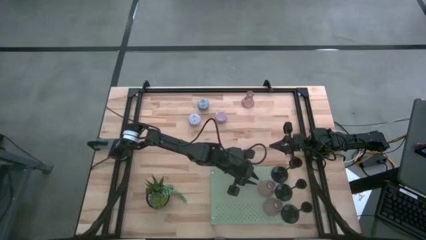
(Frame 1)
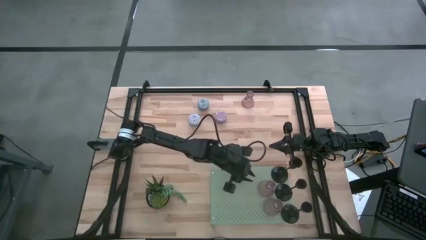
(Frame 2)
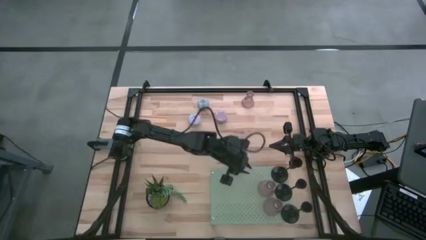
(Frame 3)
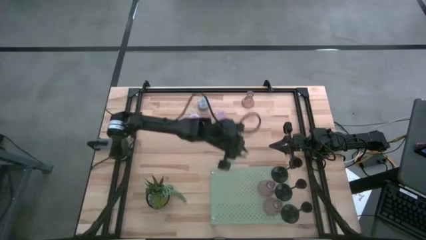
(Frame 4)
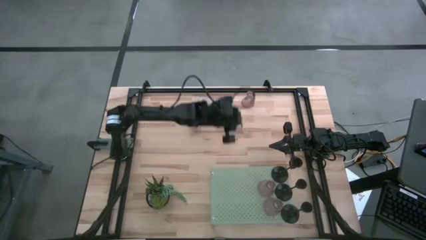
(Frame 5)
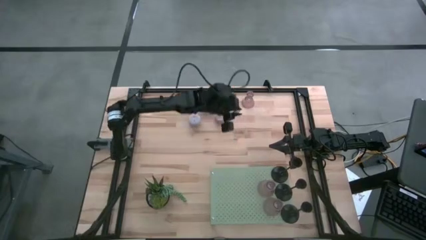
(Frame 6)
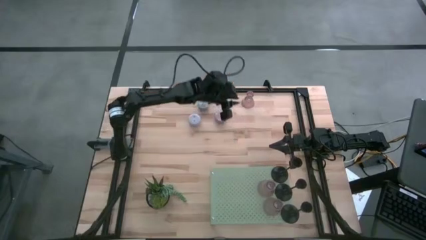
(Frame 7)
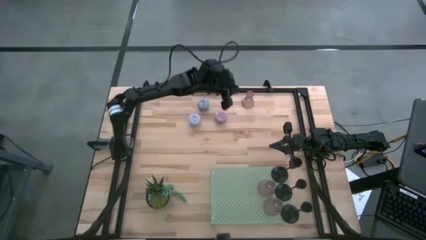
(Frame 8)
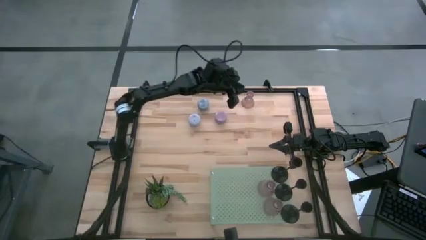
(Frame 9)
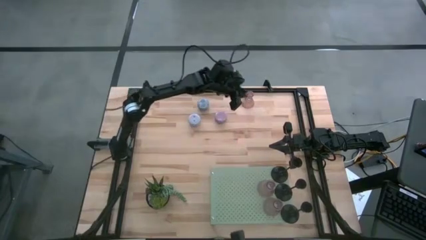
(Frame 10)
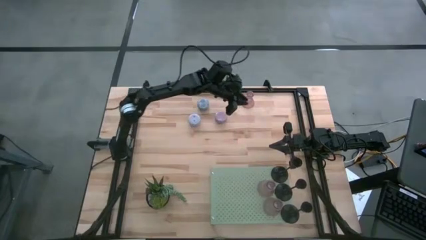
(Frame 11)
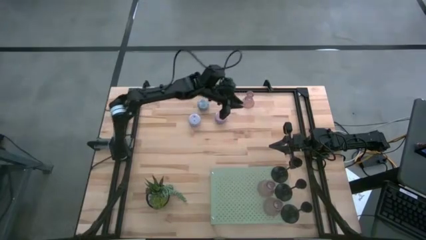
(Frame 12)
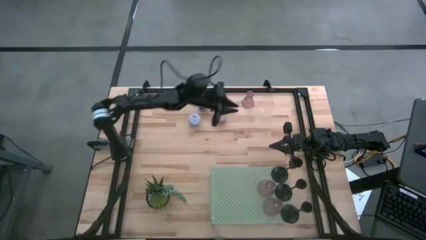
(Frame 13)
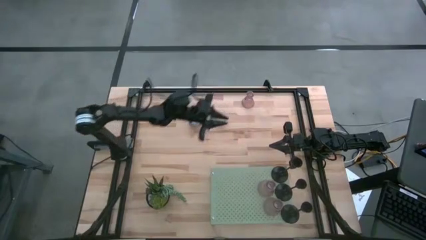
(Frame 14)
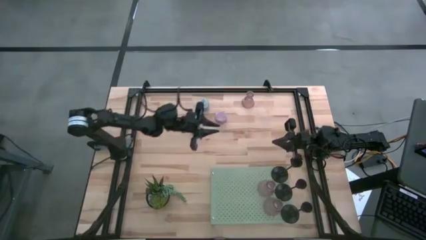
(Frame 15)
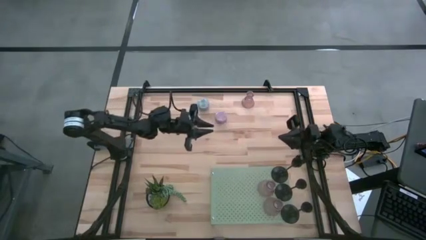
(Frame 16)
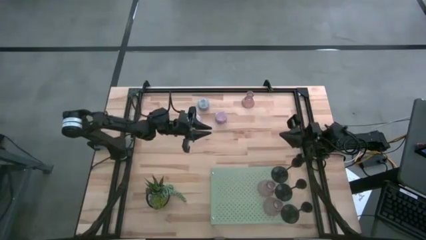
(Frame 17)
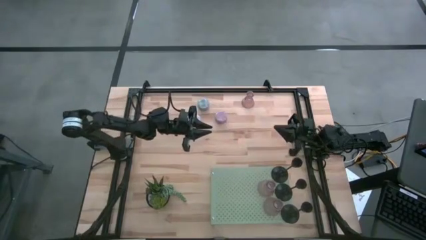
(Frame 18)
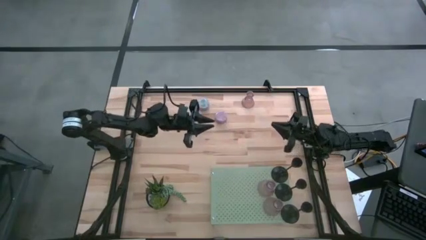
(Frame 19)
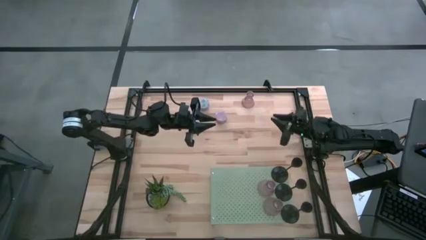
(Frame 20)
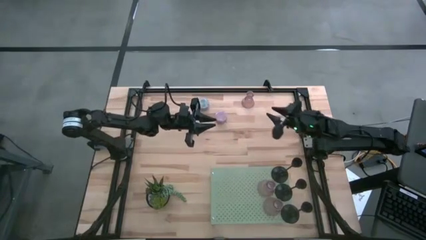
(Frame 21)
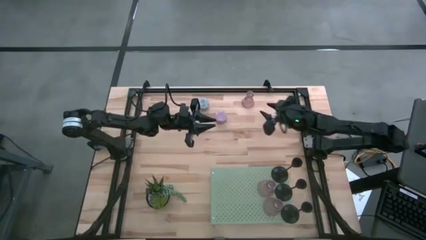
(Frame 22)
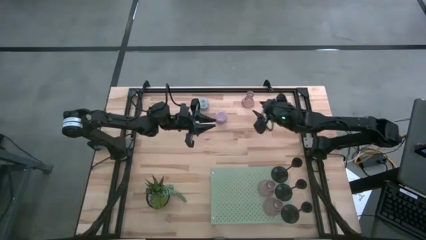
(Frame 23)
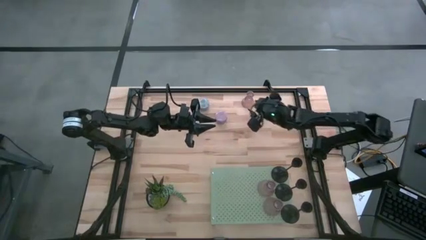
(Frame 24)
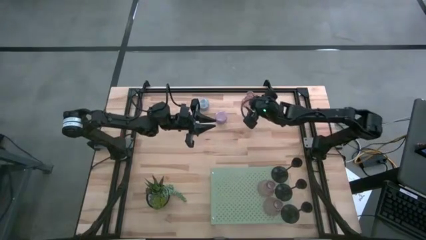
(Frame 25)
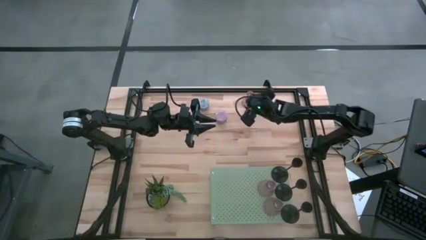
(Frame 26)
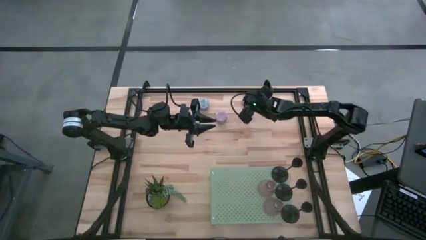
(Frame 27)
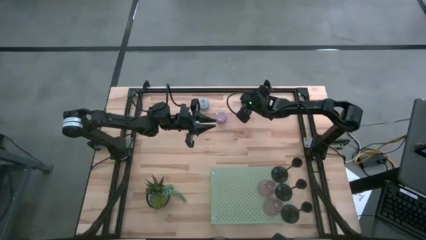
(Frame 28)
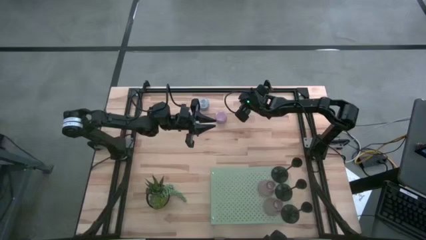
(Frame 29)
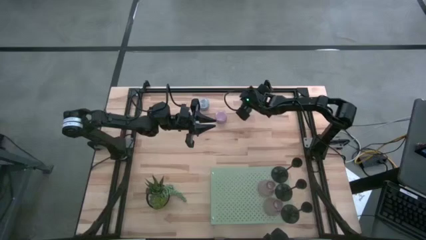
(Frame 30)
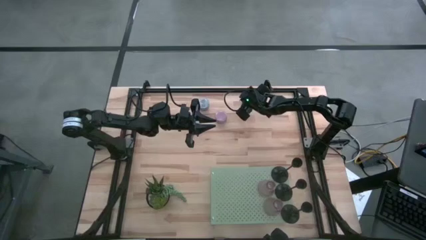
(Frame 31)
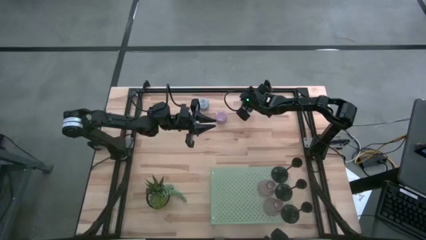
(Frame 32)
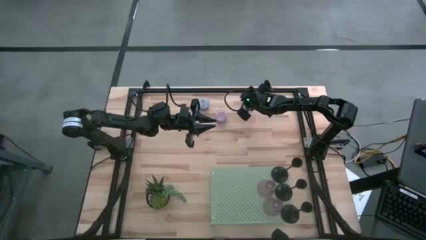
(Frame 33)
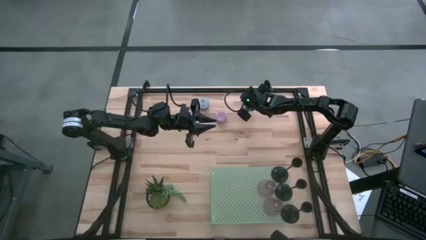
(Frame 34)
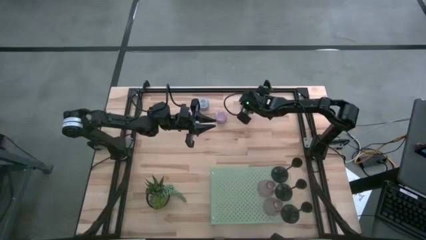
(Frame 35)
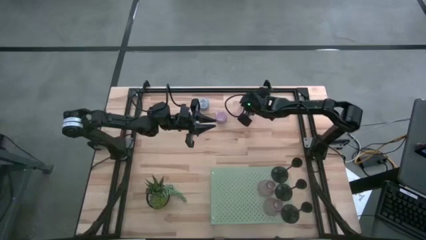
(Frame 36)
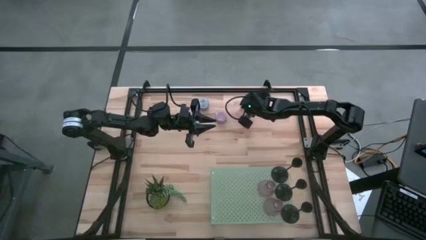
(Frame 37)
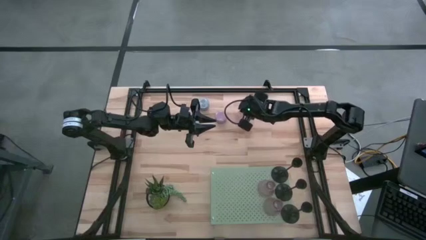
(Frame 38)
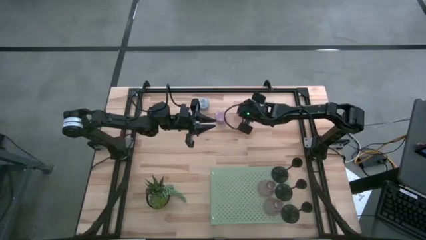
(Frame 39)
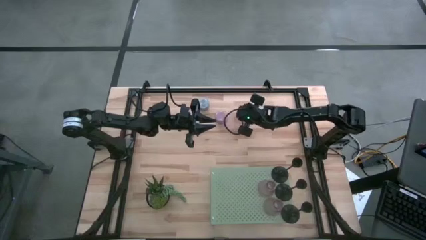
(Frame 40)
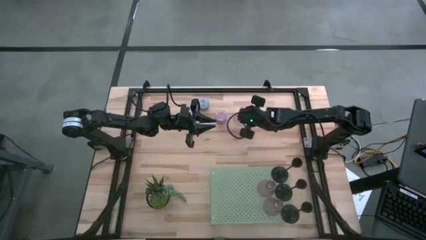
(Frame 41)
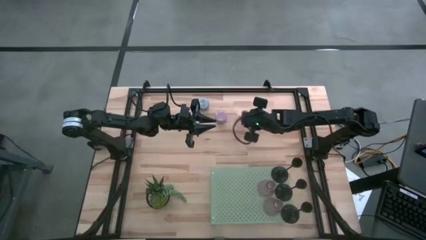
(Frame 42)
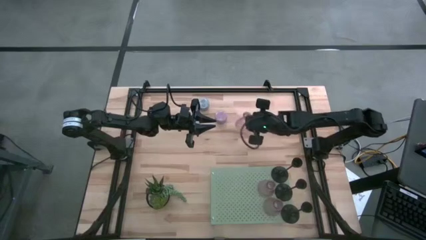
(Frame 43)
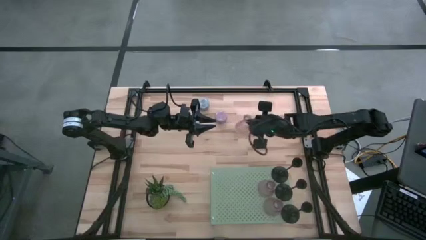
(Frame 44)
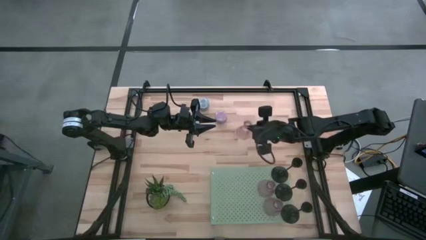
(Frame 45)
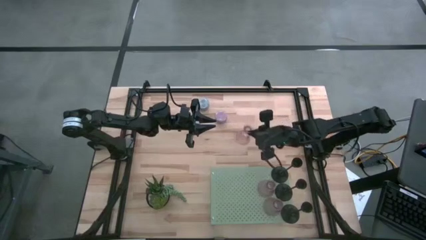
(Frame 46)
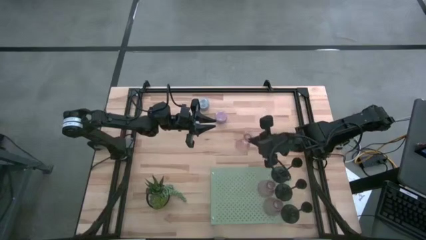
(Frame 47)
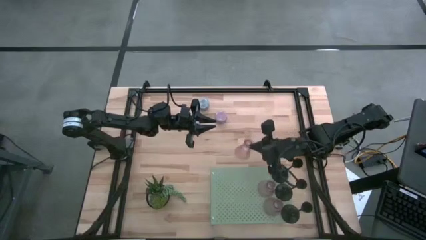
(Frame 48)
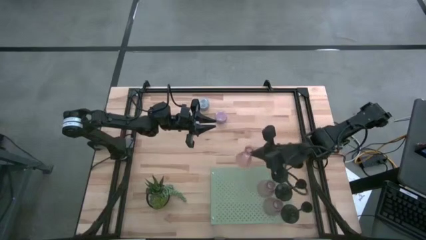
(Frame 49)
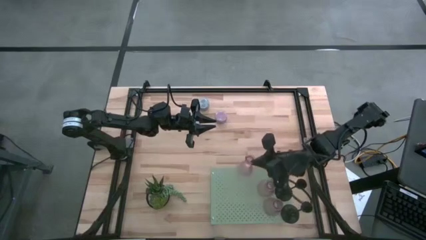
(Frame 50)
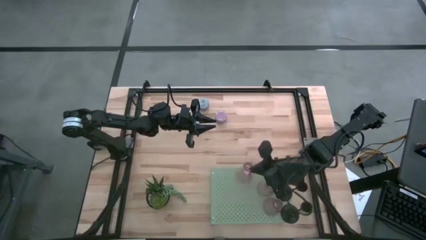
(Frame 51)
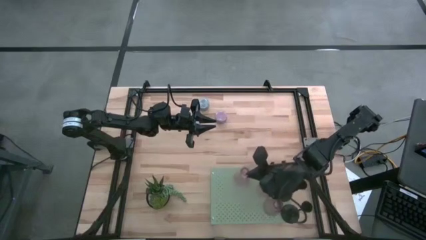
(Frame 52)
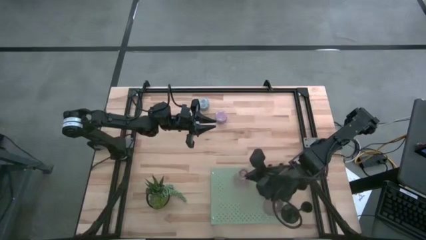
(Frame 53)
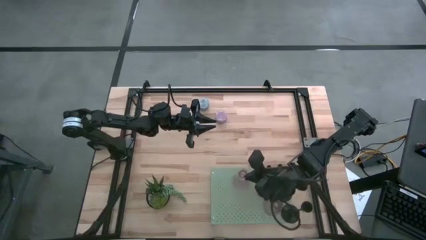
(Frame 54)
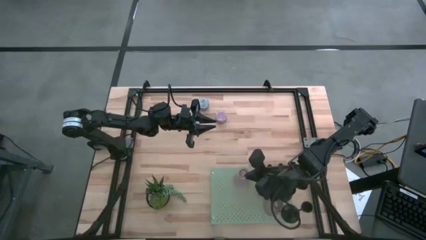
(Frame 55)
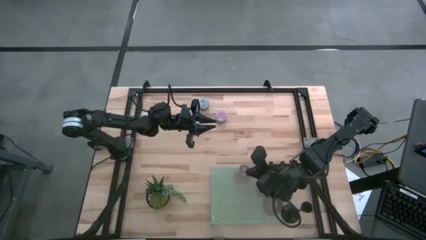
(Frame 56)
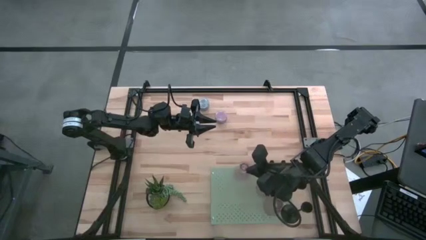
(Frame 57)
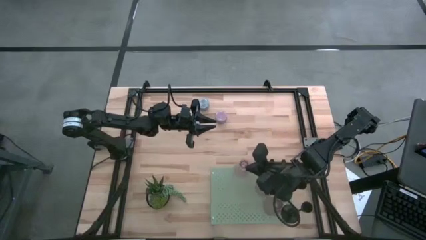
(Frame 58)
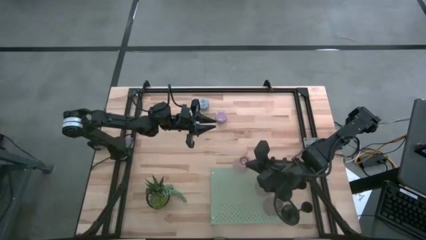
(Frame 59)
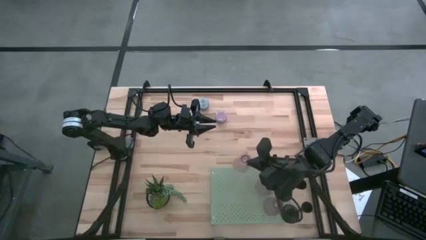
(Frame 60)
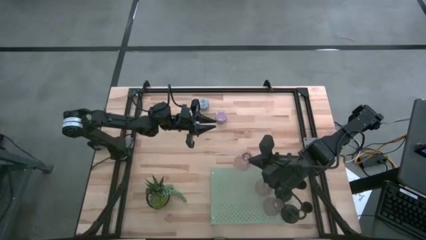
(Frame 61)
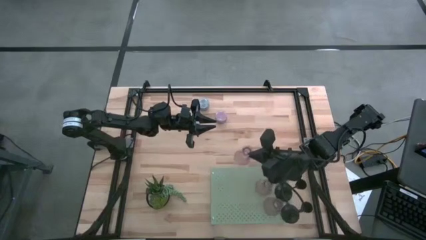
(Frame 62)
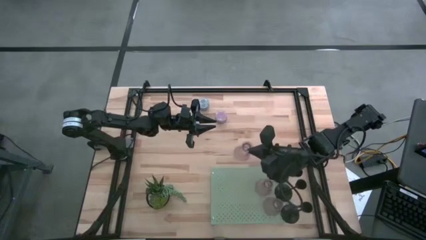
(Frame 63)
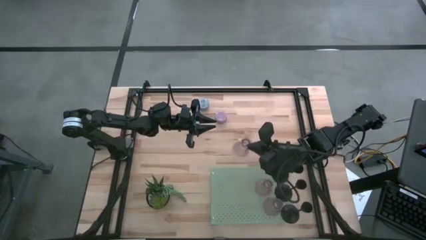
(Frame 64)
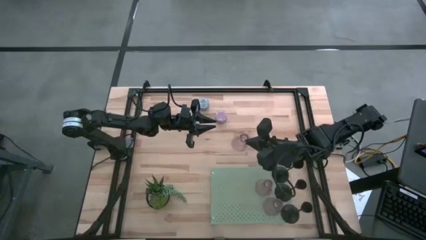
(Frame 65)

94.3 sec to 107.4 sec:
Task: Pick & Place candle stick holders
Put the left pink glass candle holder on the shelf aligned with the other pink glass candle holder

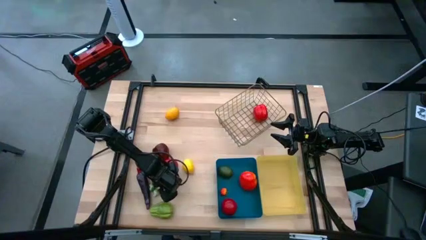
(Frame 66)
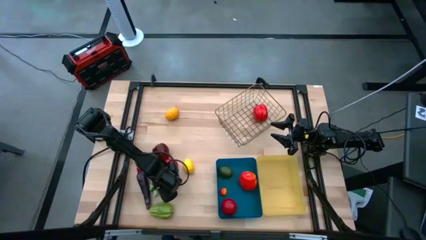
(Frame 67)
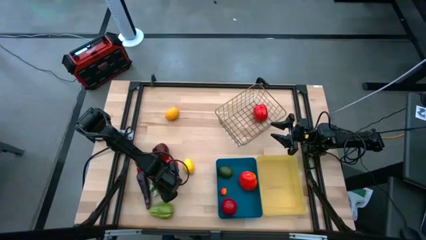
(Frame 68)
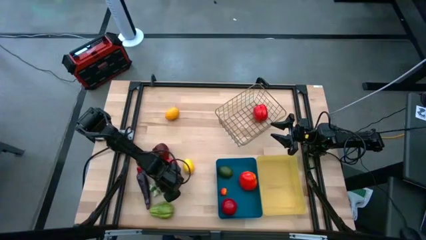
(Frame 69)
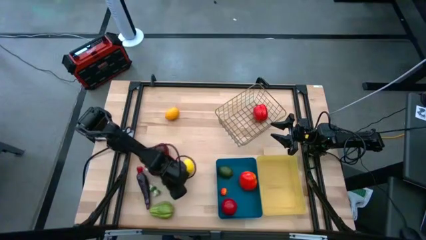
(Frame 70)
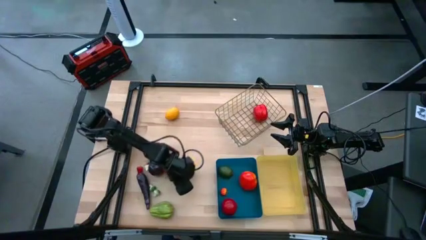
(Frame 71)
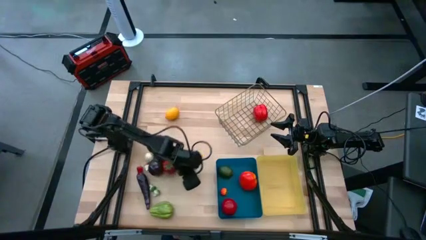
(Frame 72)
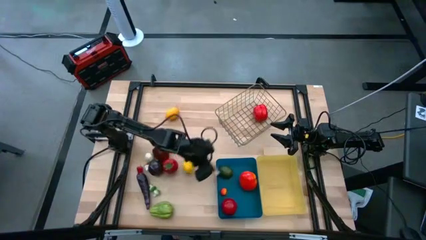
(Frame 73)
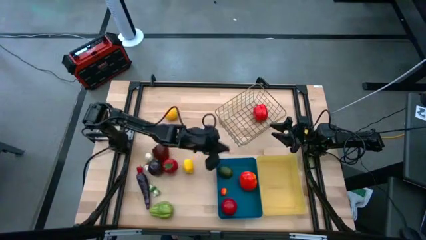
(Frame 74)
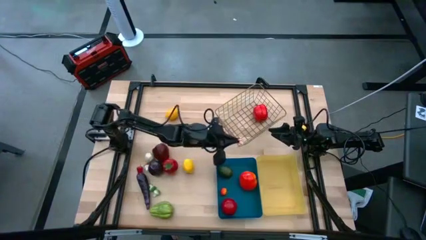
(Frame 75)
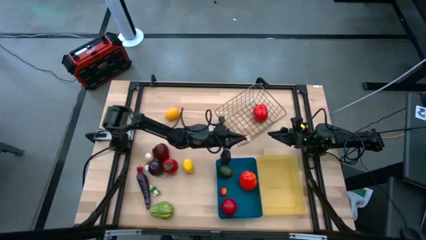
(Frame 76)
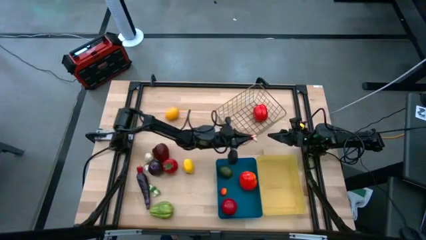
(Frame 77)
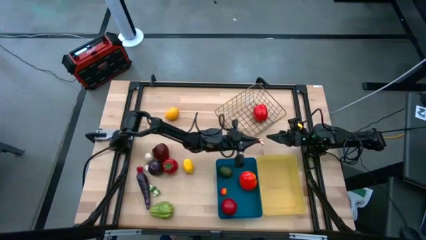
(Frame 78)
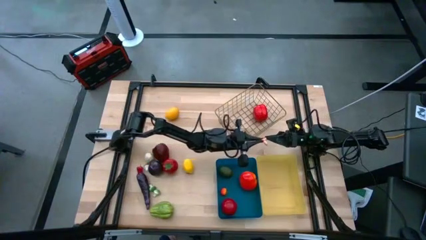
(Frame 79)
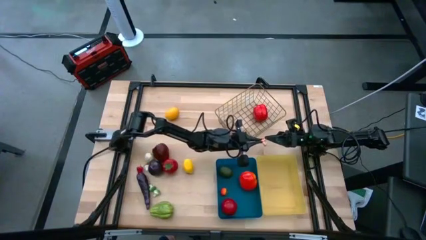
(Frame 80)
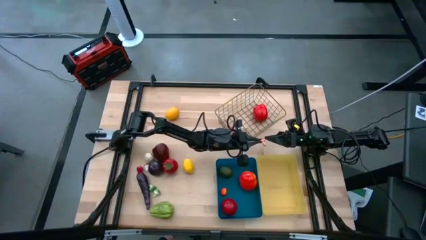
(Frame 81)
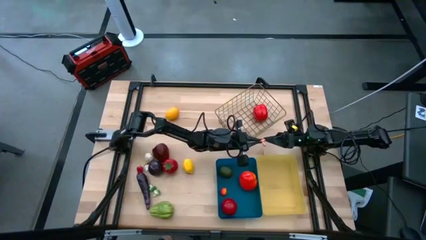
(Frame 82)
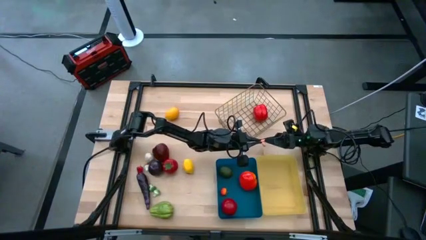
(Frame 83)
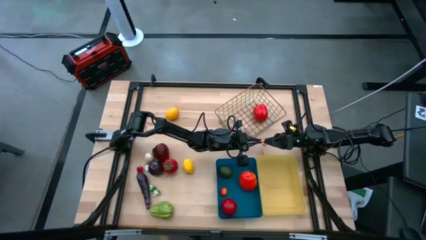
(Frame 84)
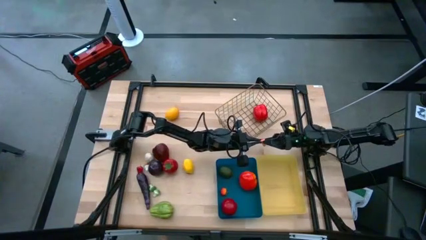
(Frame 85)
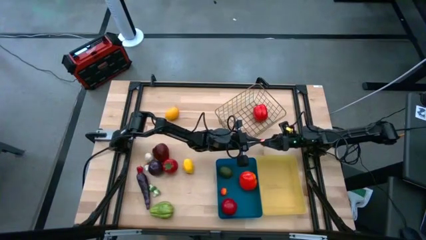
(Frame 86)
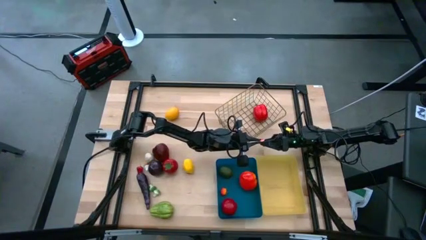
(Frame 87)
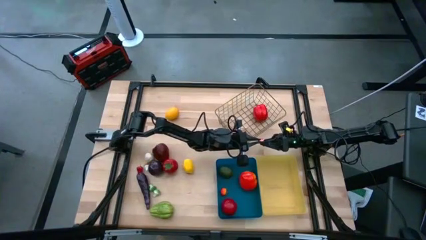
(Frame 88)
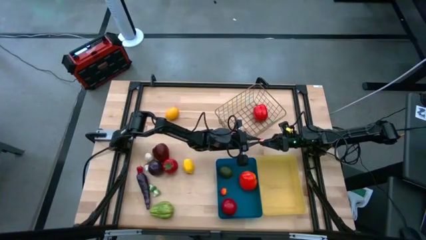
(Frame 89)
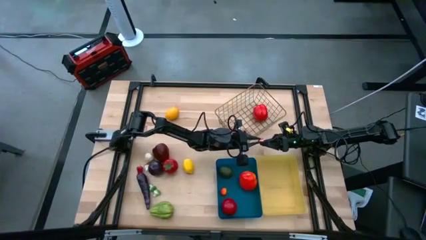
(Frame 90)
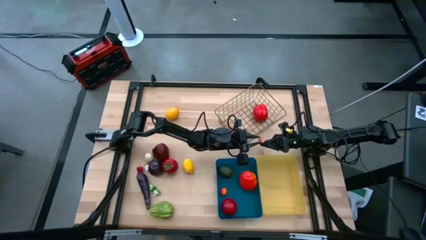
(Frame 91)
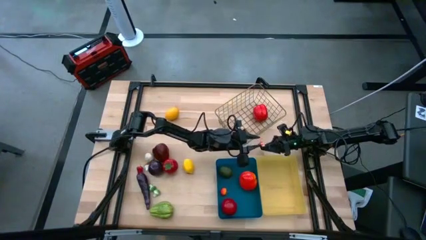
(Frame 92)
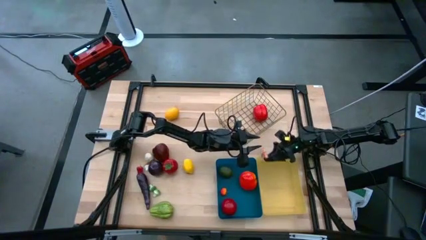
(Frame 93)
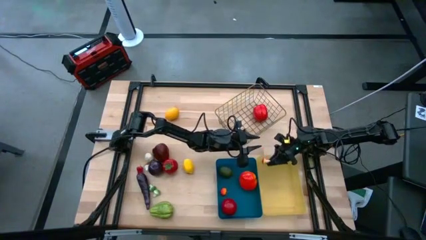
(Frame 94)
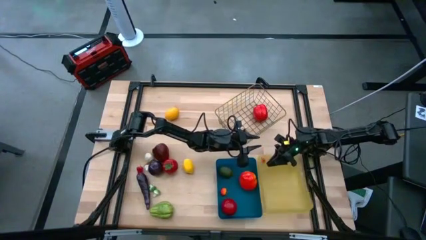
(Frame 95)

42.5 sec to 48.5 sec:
Task: Sort produce into baskets
Put the orange mushroom into the yellow bin
